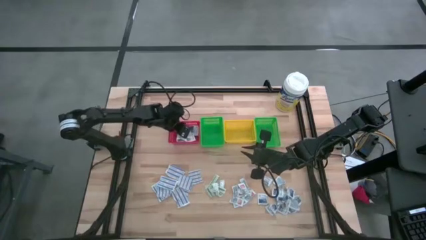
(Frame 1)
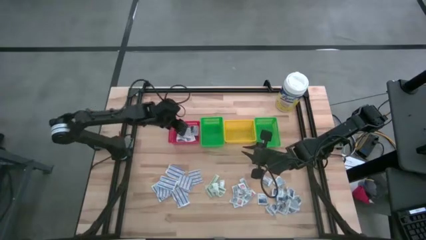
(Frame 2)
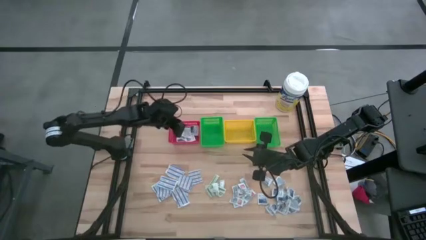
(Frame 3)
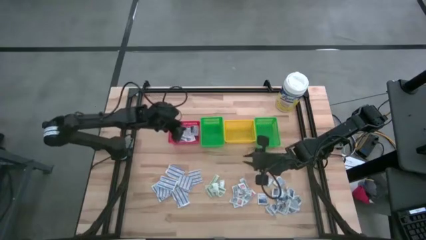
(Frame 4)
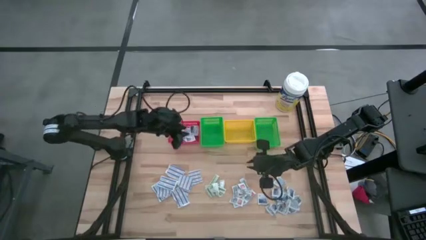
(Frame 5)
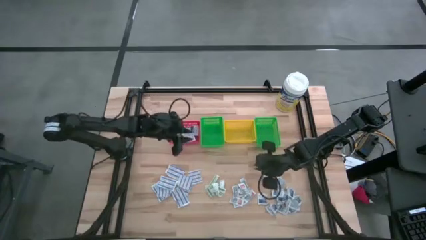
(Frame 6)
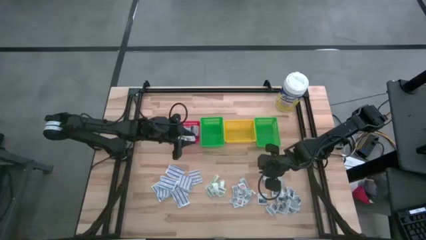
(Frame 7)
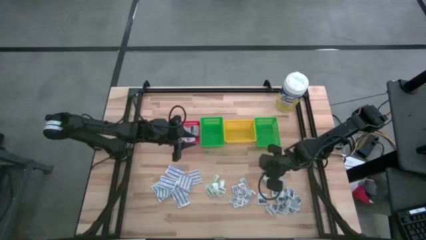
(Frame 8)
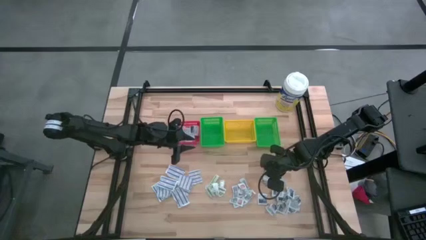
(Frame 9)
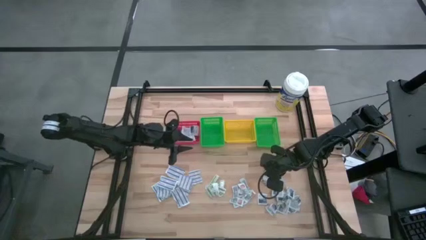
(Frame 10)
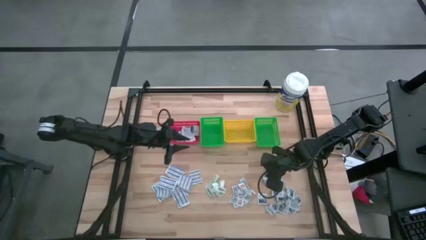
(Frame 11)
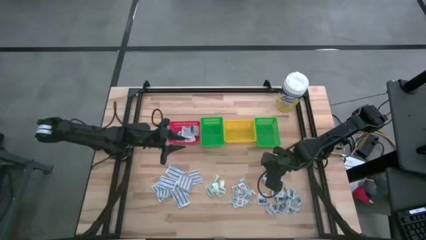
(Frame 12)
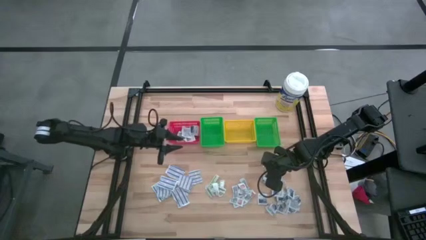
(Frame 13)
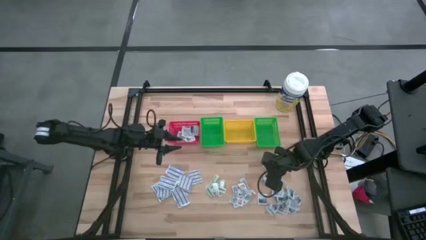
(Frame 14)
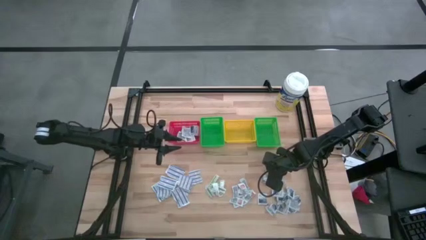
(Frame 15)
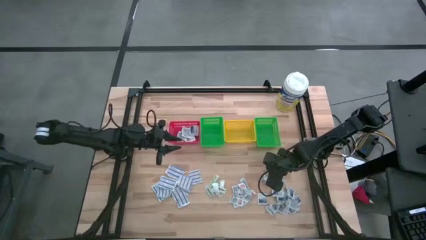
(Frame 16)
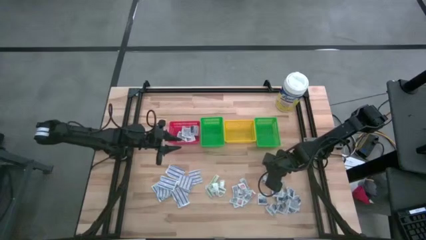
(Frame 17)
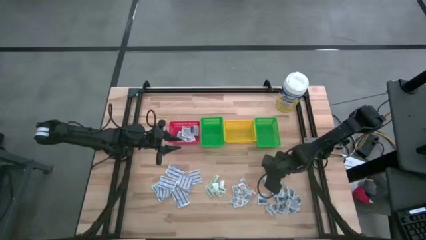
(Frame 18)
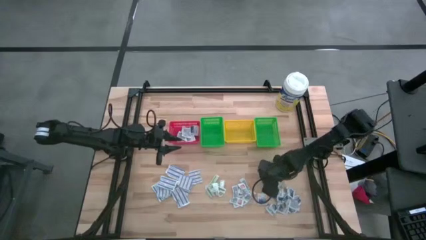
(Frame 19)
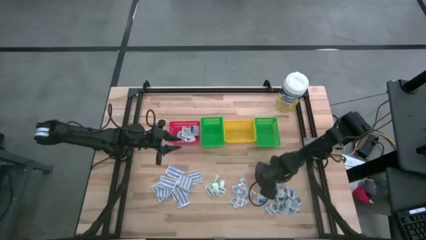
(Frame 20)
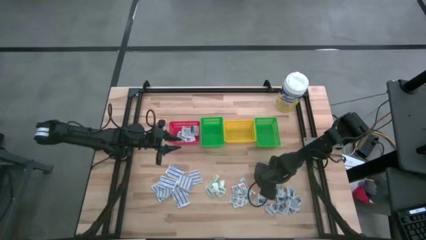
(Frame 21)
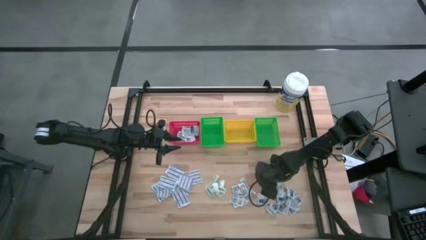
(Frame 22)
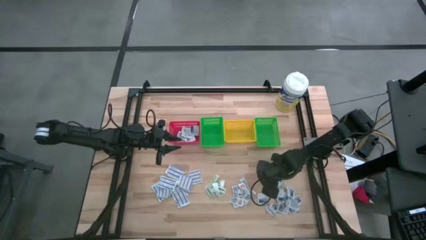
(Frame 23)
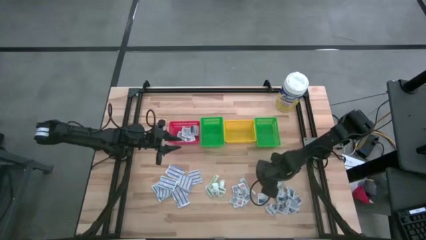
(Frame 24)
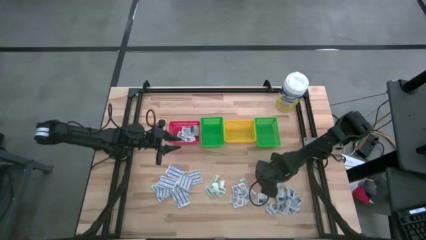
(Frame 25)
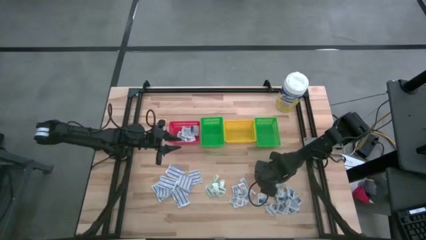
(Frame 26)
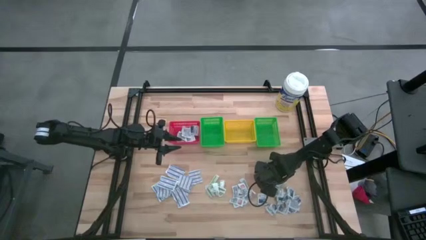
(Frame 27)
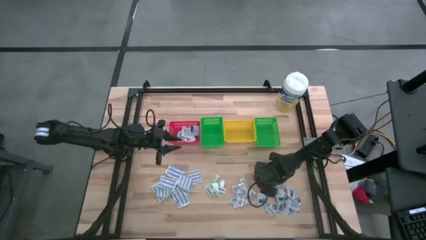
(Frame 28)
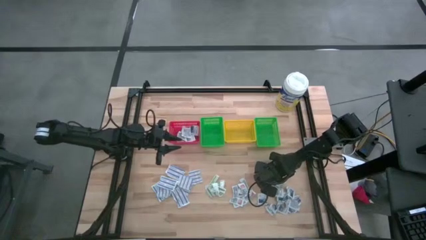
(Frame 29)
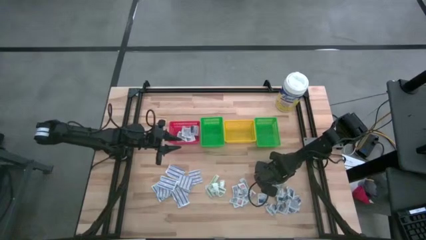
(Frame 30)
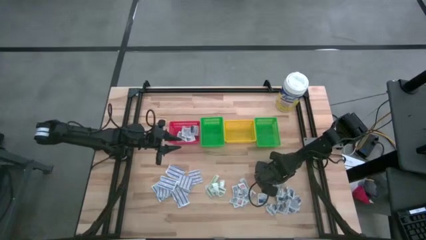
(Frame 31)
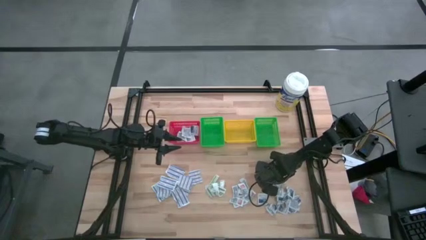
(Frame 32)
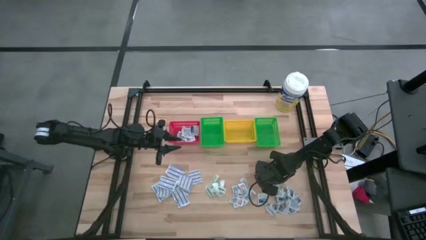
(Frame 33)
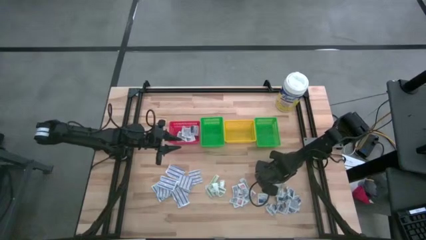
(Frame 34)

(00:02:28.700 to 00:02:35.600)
Task: Pick & Place First Aid Supplies
Put the alcohol pad into the red basket
